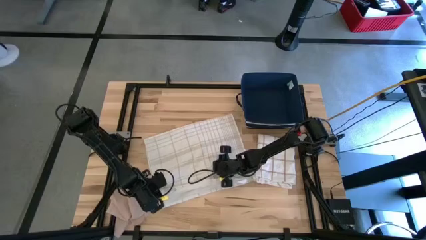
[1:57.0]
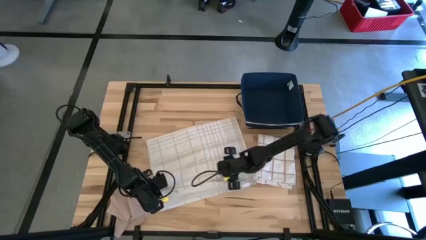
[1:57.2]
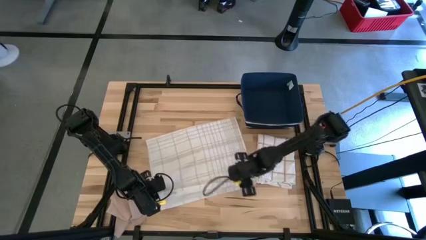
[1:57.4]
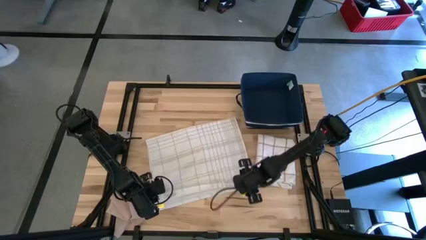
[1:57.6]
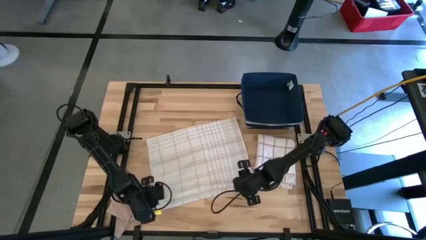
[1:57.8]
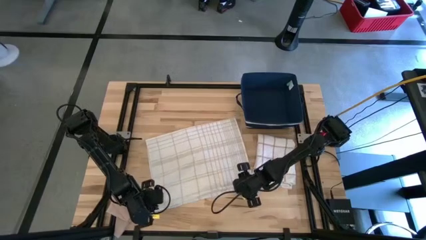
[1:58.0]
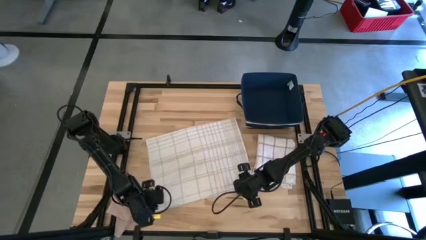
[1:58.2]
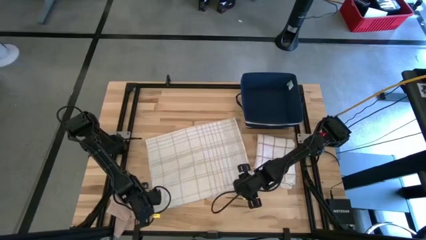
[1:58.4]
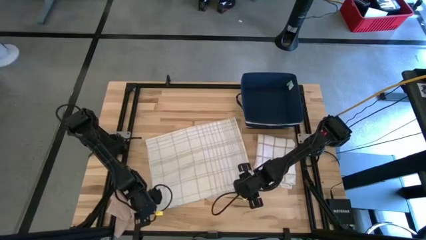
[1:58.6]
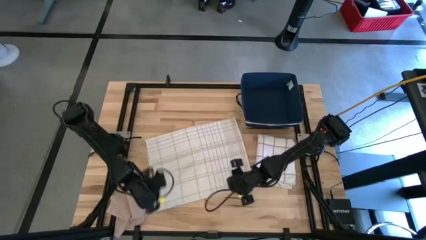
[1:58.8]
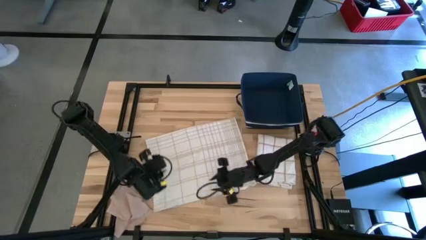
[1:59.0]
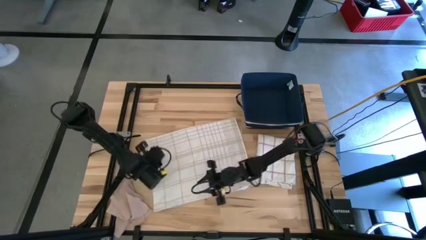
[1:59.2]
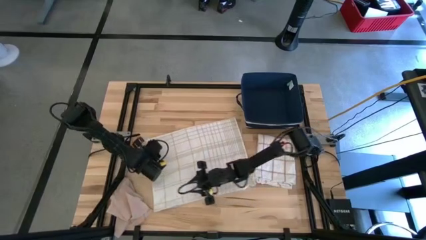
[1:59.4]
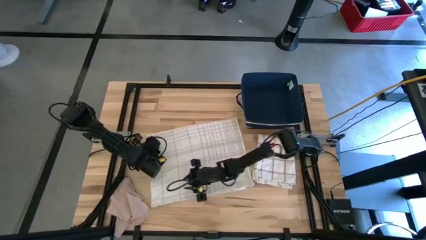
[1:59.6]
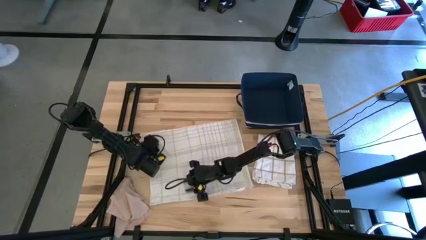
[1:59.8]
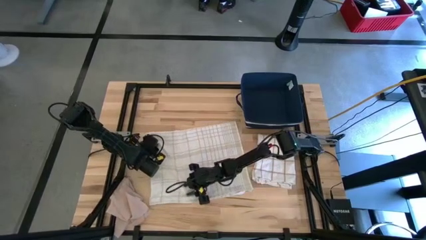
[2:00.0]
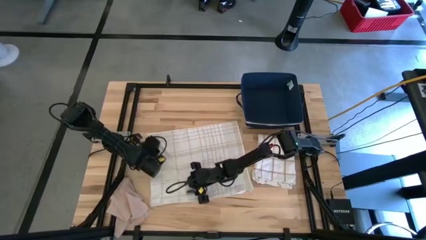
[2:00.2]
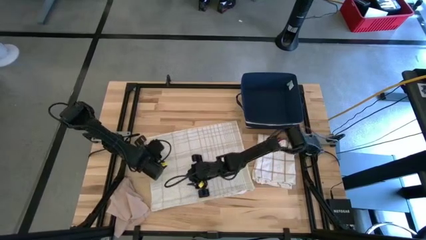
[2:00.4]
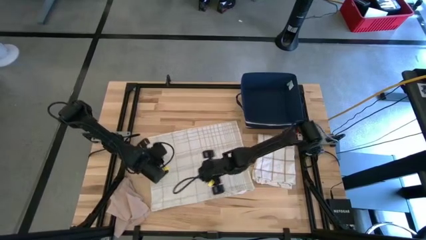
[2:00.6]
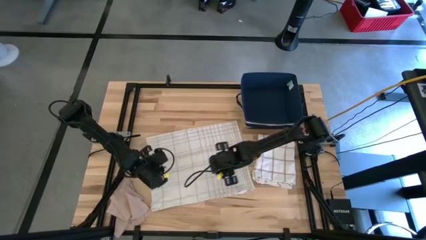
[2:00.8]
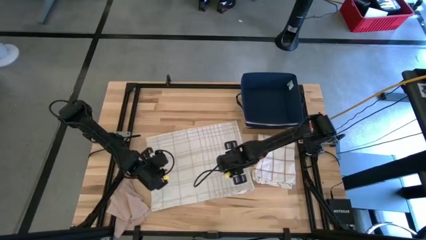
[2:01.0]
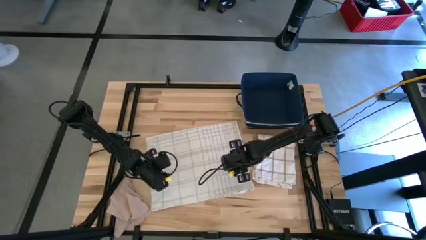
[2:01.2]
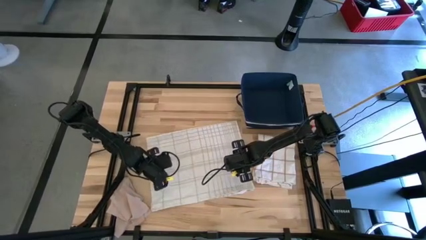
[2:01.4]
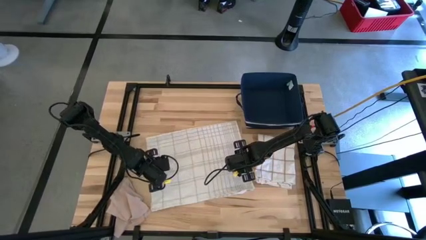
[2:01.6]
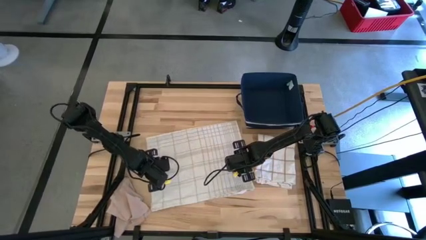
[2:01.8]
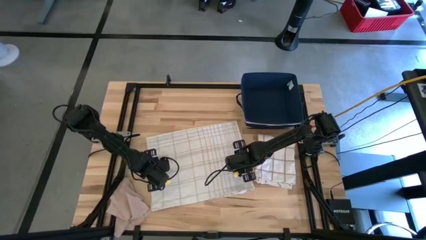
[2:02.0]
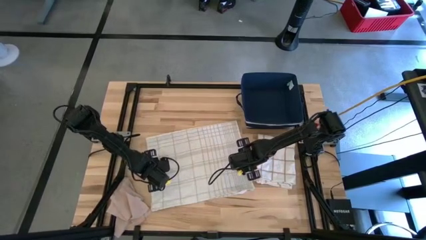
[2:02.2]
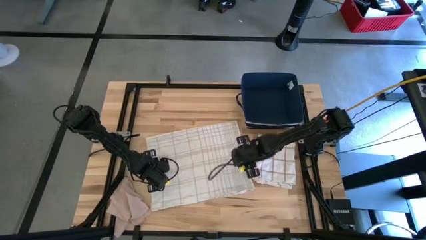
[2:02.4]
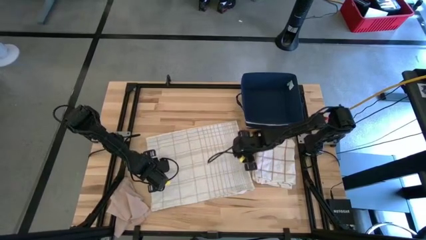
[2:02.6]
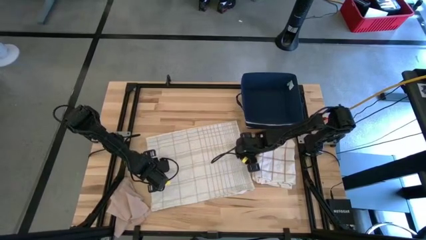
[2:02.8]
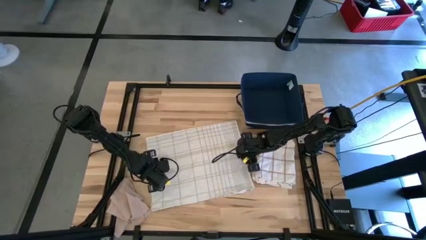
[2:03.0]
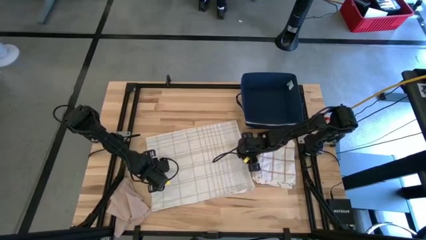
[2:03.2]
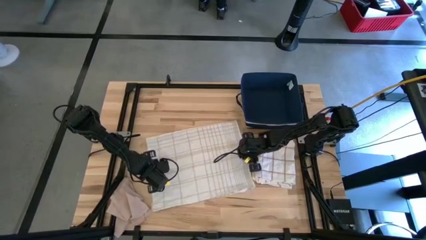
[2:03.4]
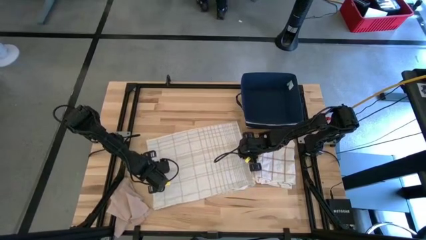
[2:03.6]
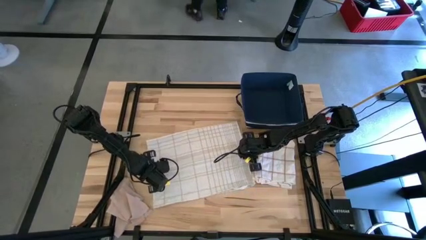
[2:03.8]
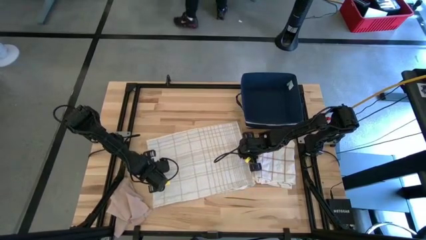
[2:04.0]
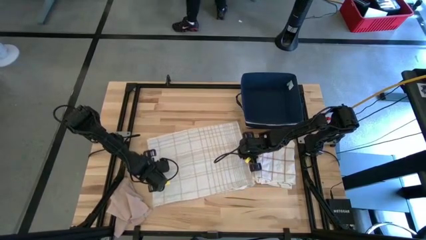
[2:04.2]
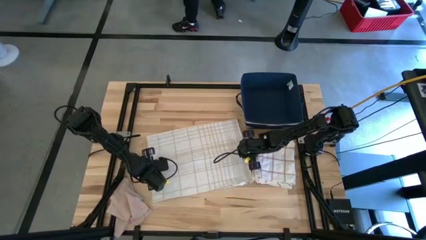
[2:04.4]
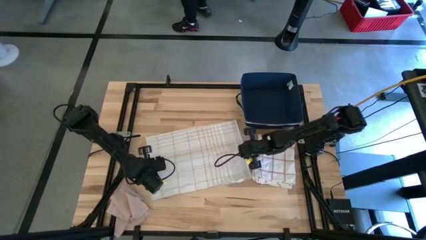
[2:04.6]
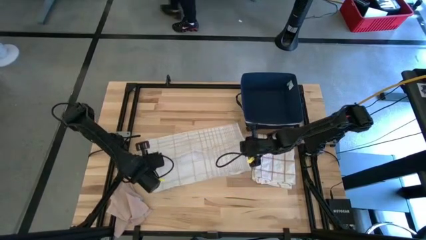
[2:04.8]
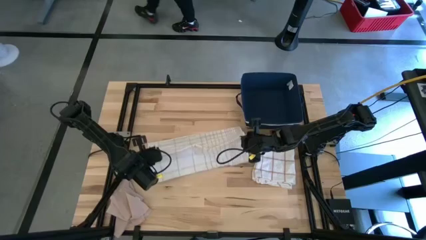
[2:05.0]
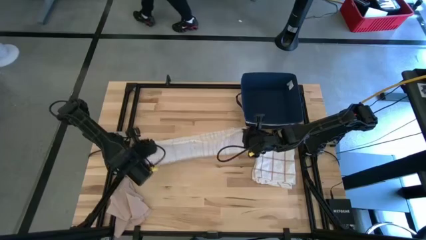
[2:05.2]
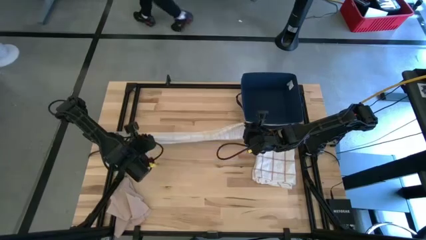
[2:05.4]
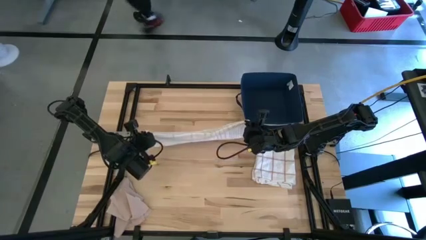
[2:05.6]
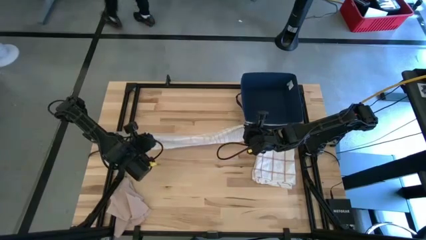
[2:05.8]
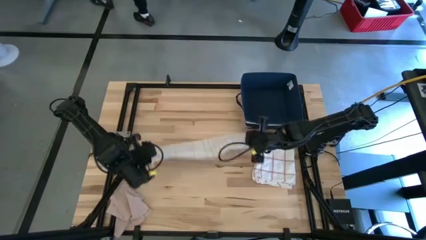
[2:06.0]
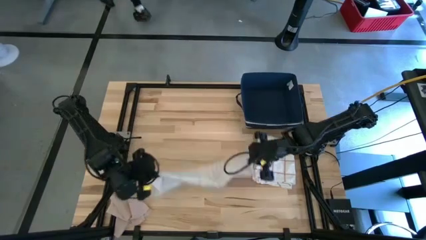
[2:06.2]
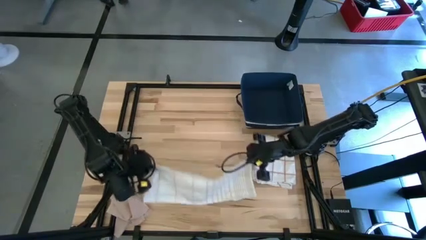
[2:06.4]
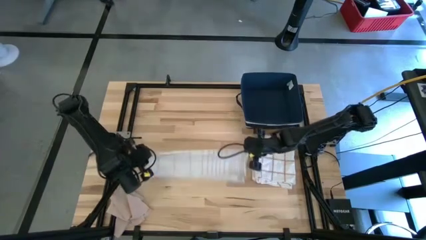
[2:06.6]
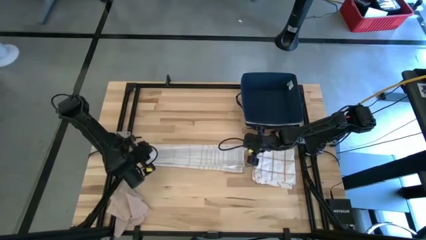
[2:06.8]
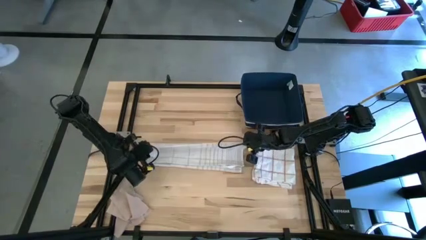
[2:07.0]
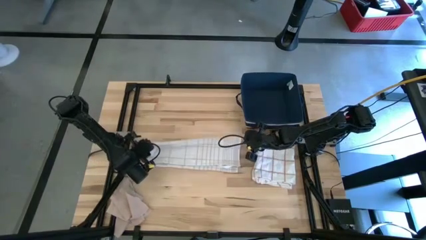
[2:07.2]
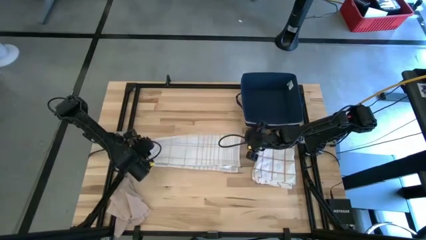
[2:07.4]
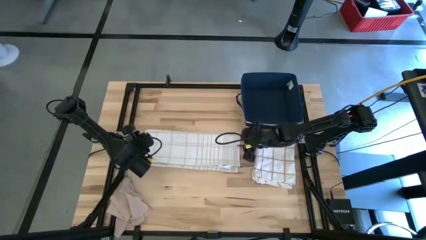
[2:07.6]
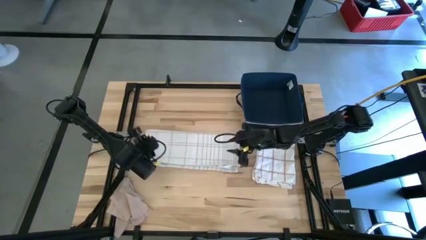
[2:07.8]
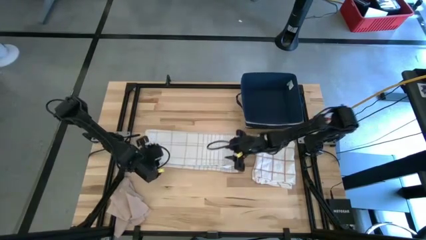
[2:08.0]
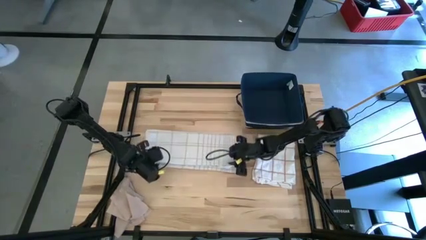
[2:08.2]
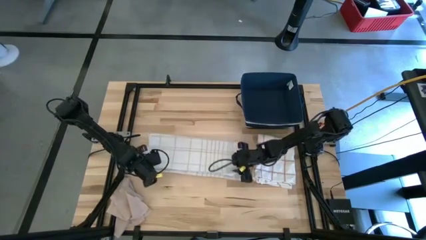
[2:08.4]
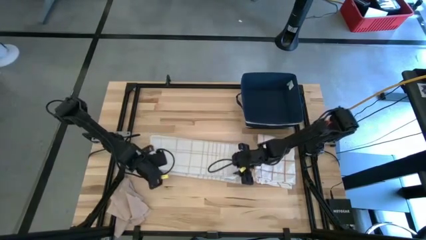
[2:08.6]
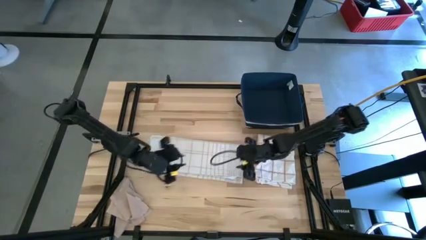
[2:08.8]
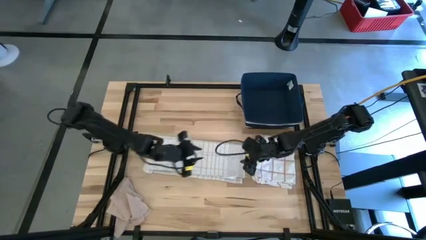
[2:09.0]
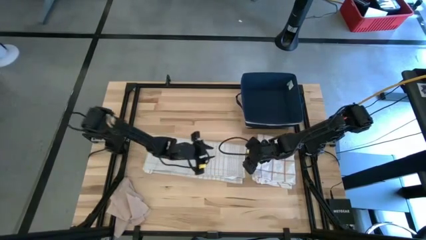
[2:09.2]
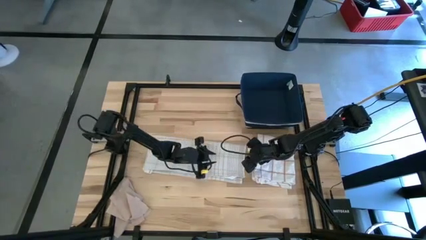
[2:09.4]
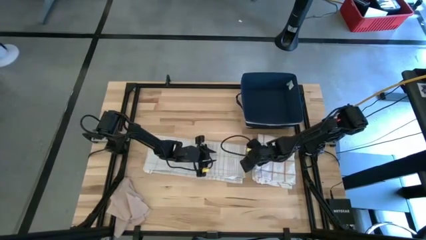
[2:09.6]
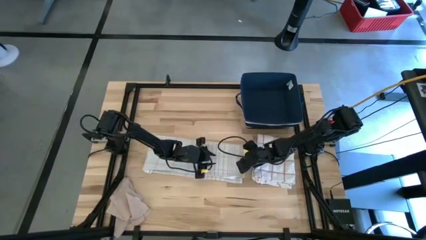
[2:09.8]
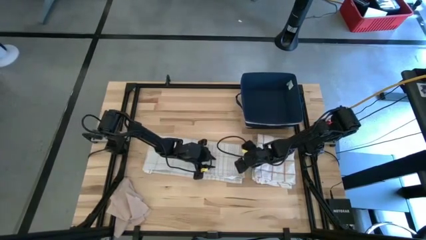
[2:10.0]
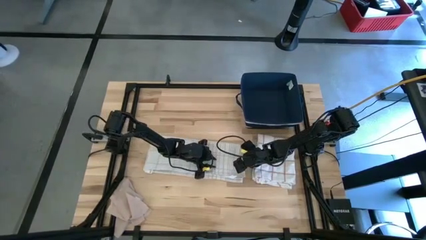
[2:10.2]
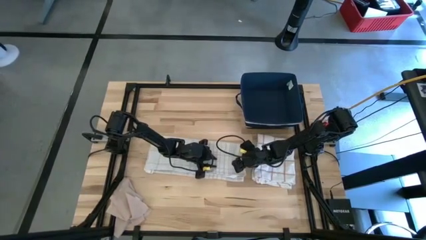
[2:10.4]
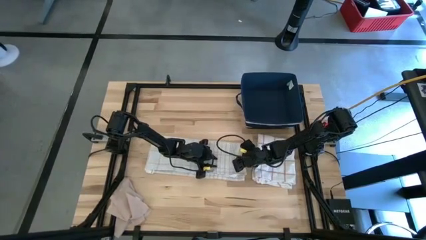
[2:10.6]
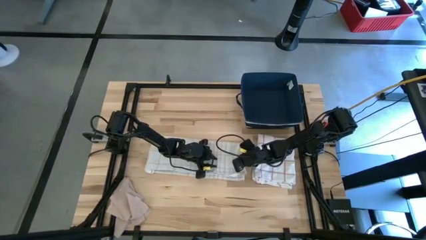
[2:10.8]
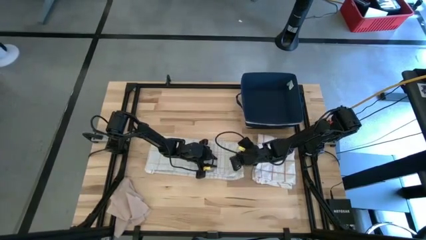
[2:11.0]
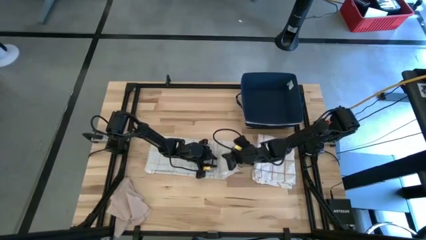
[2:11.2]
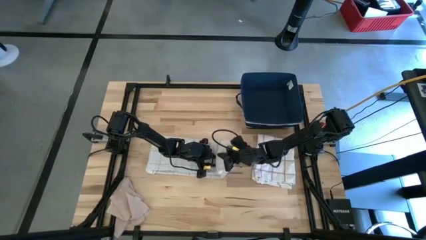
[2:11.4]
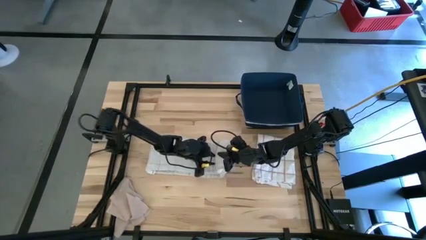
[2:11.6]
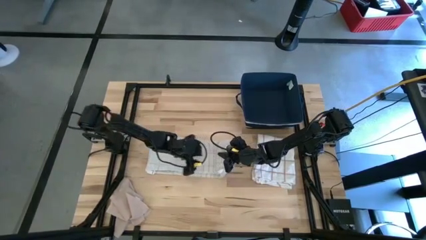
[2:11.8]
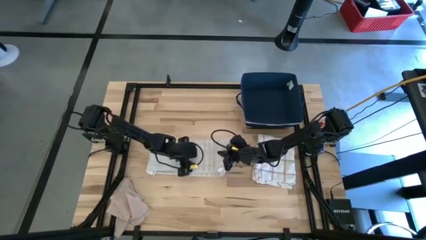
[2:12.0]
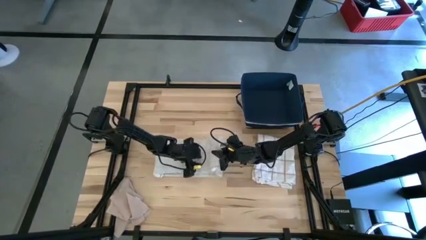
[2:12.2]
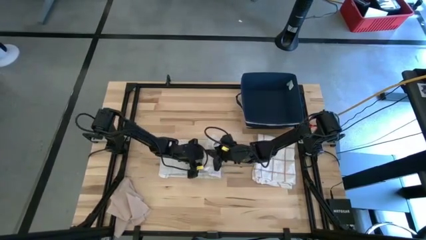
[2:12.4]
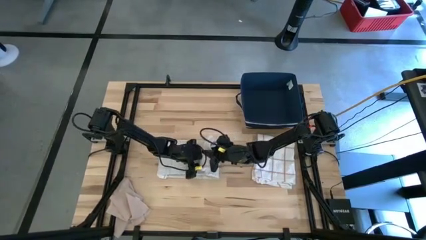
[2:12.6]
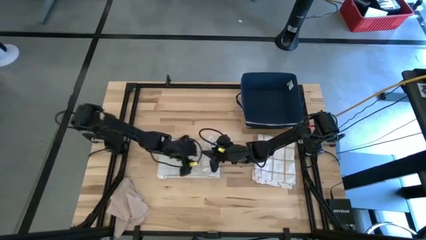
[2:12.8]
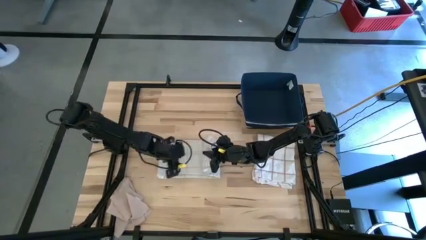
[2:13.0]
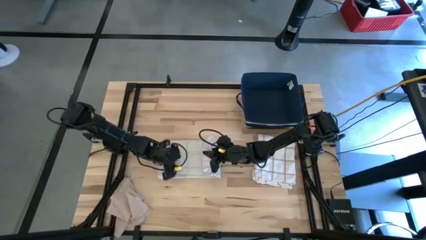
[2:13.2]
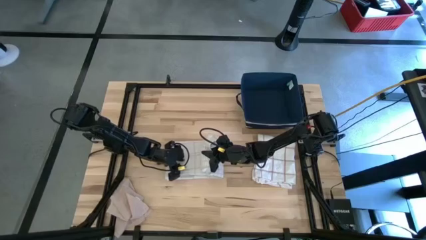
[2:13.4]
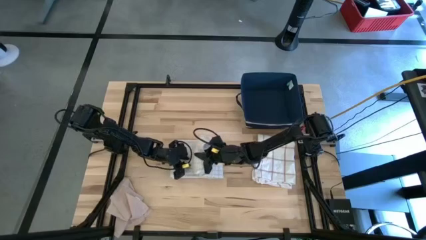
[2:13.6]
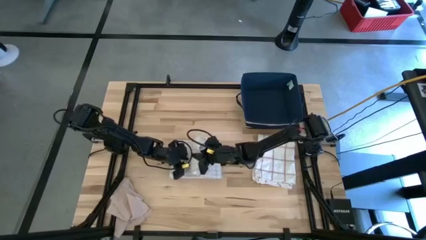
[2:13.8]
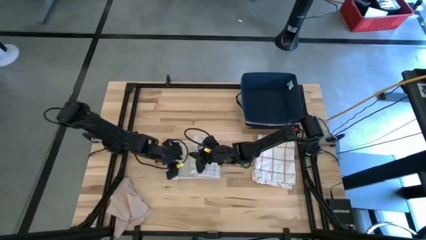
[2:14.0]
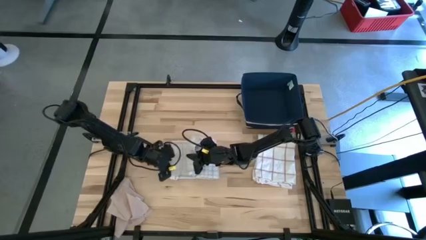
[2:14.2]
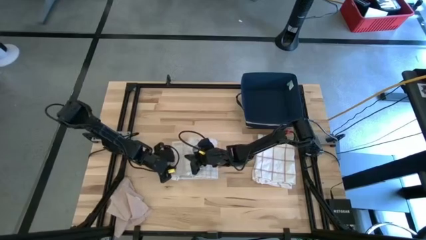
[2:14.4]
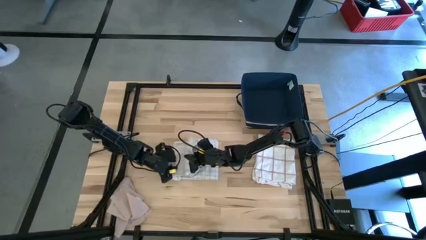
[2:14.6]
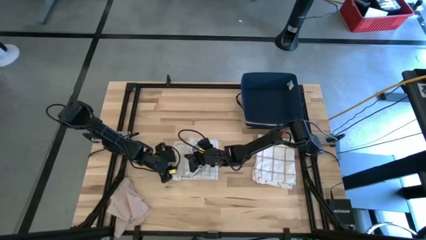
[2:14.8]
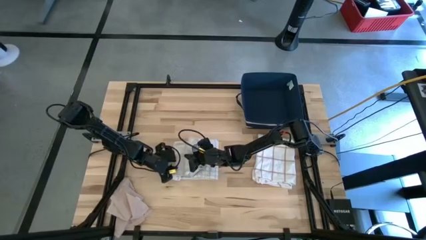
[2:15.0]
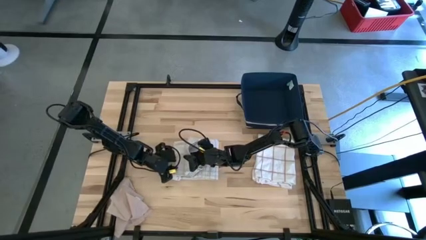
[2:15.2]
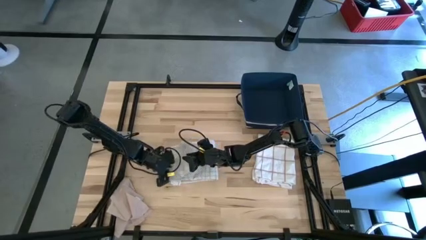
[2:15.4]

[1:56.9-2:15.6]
Task: Fold towel
Fold the white plaid towel
